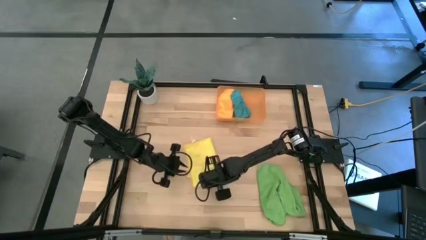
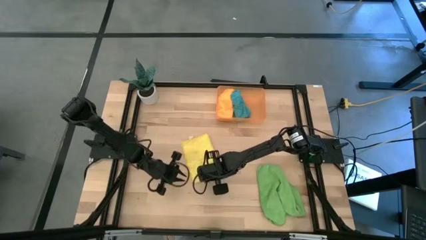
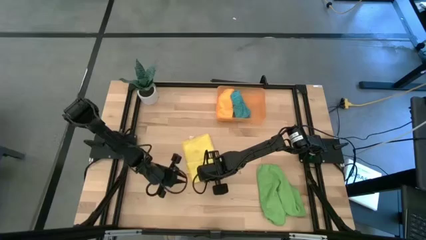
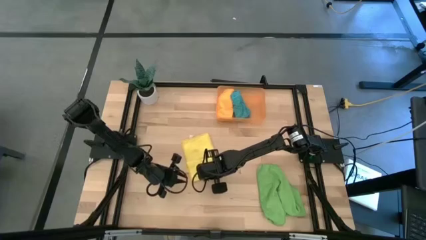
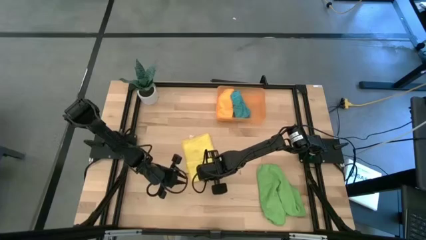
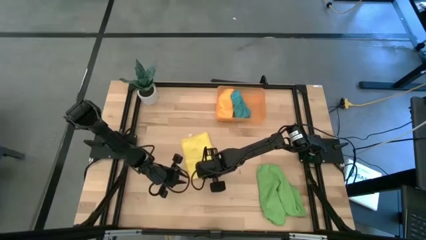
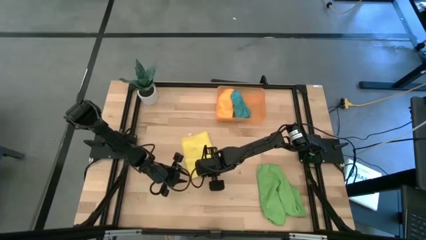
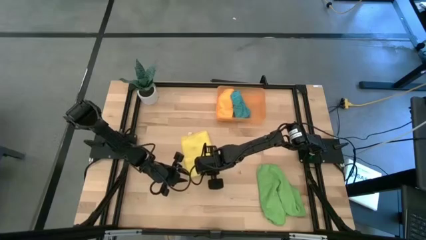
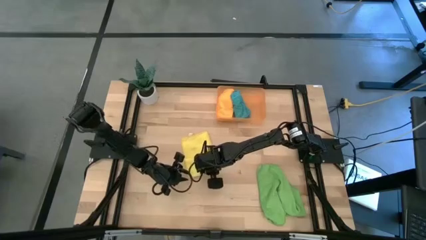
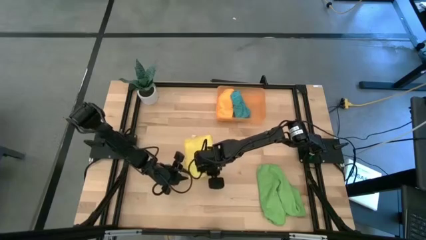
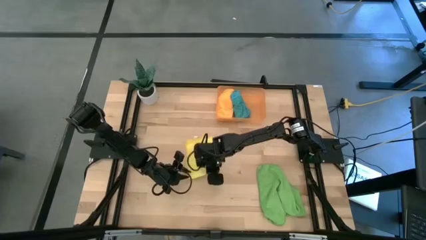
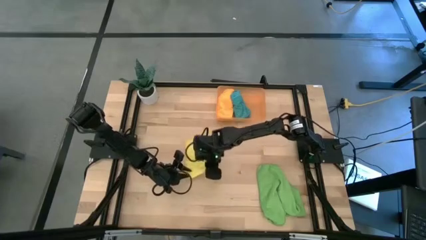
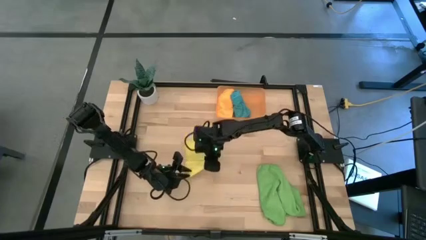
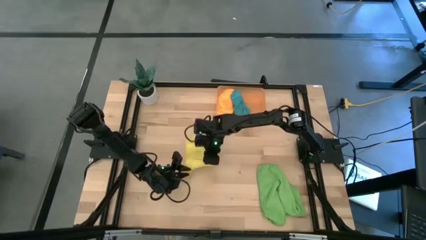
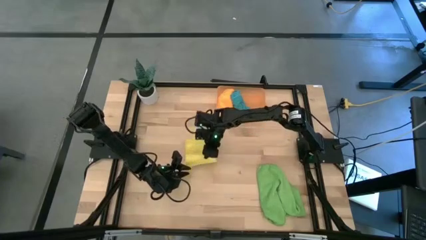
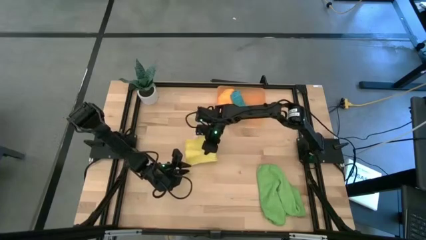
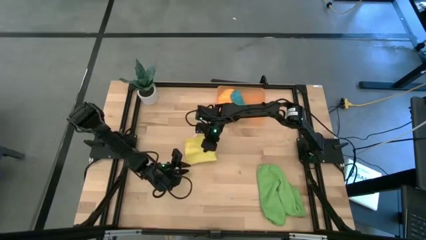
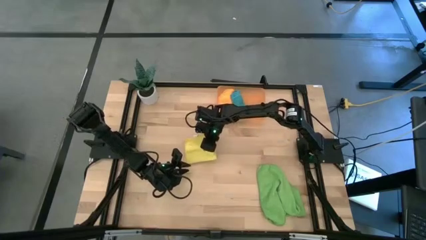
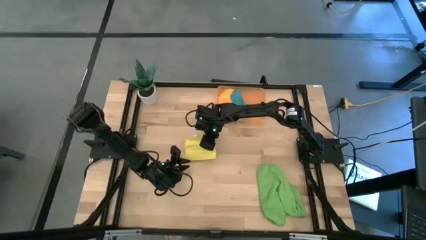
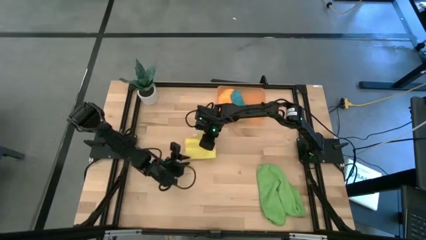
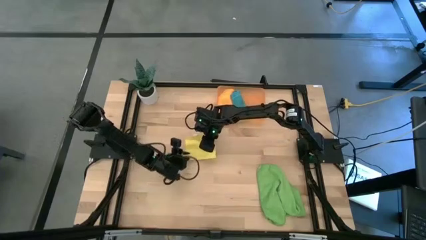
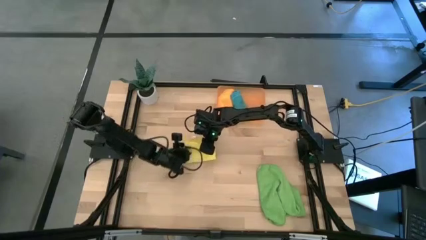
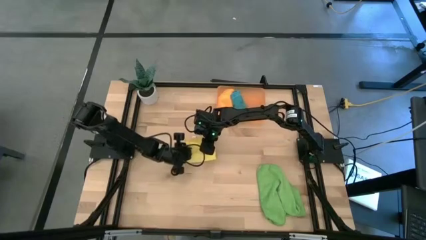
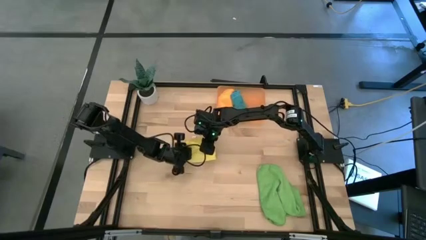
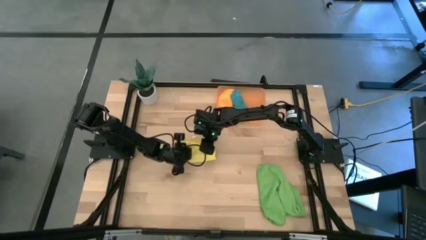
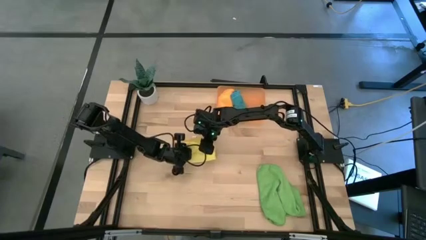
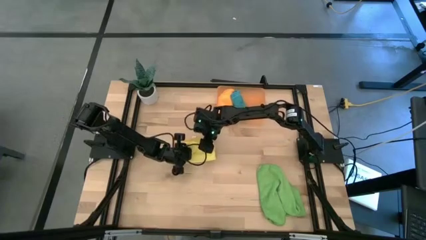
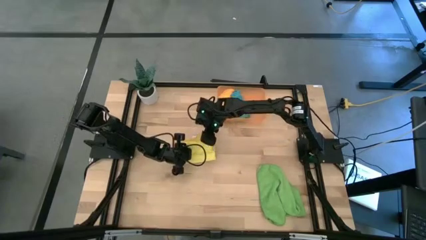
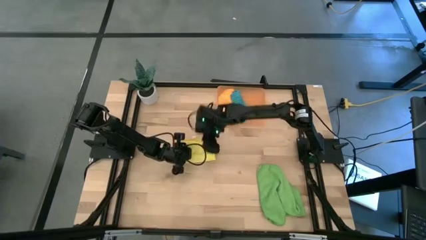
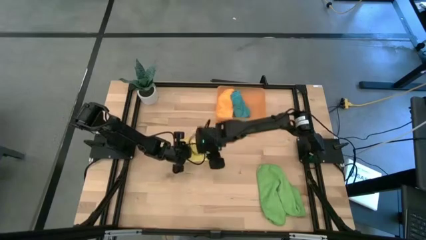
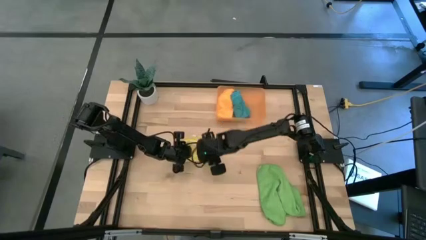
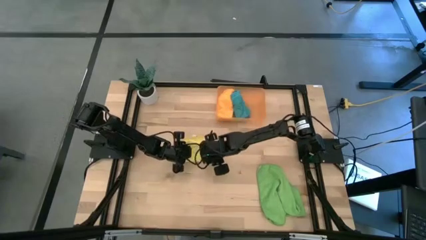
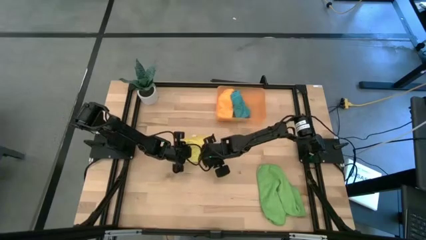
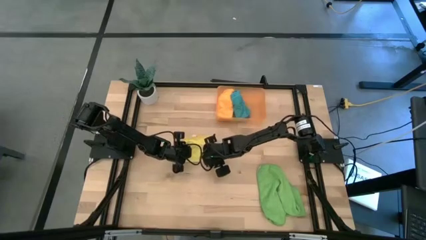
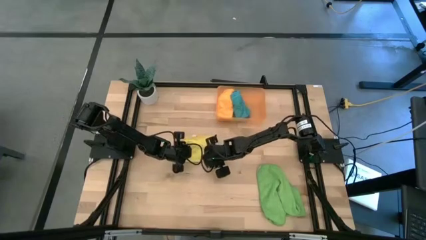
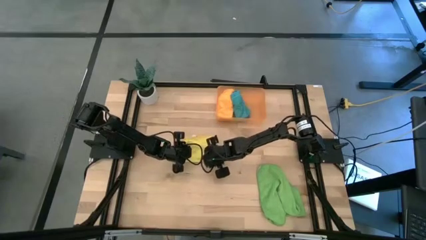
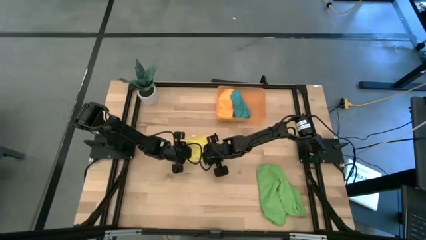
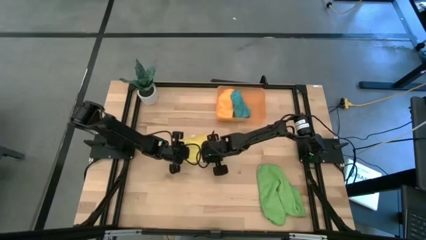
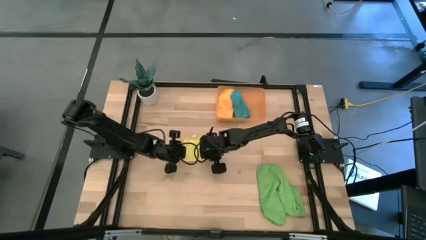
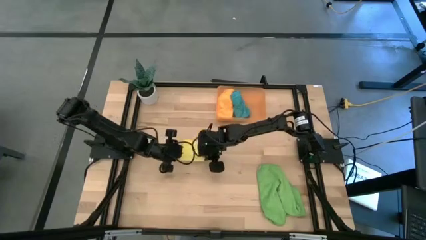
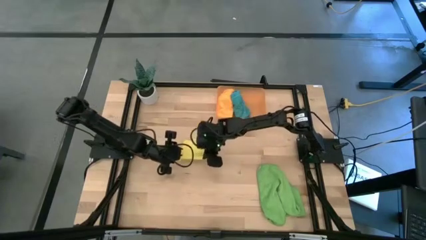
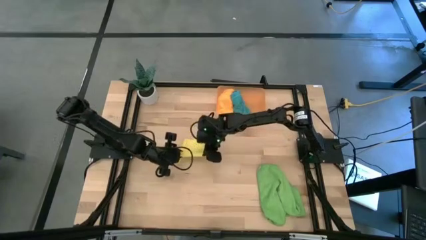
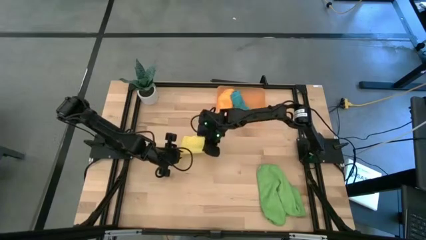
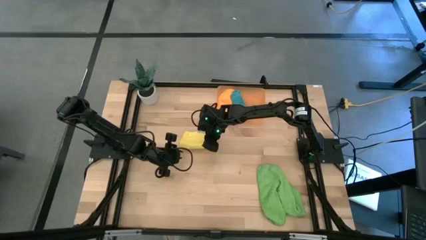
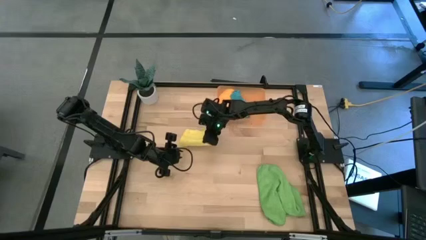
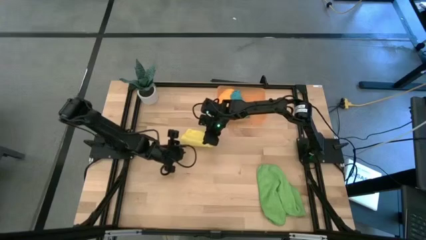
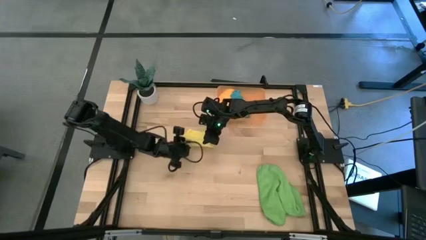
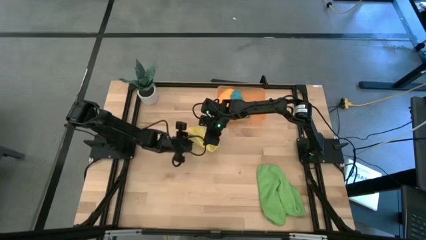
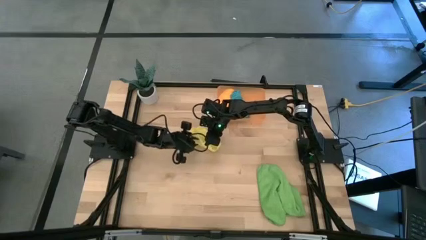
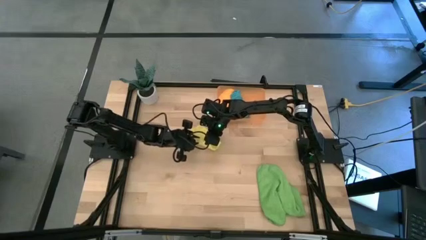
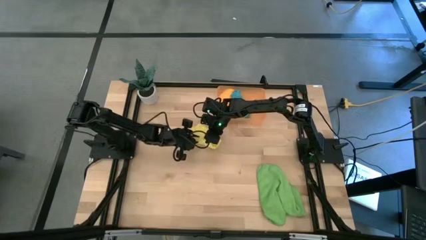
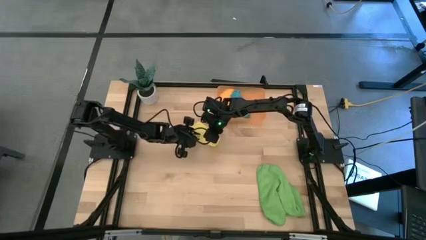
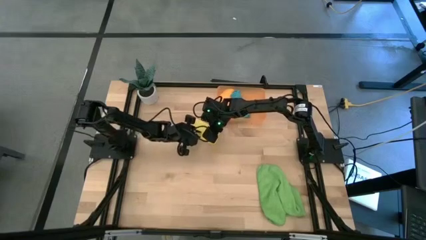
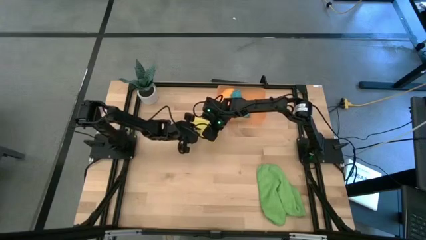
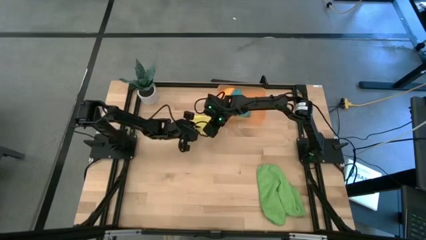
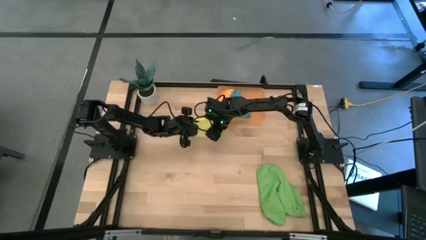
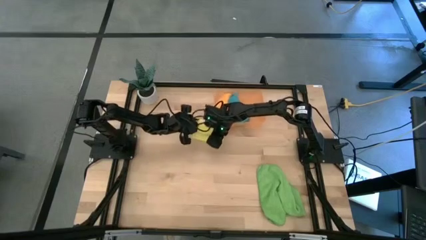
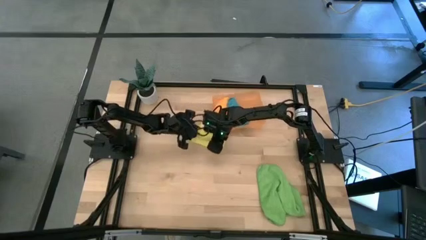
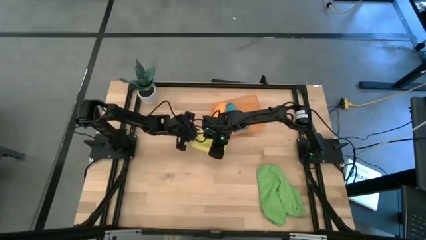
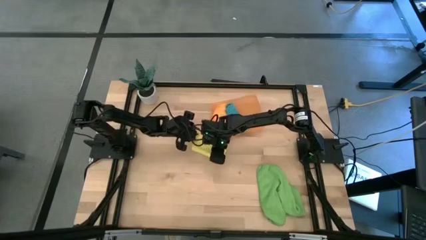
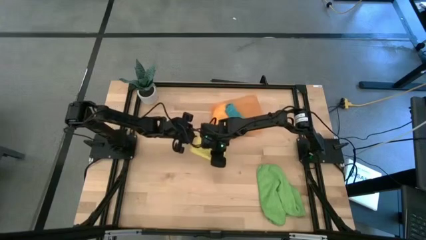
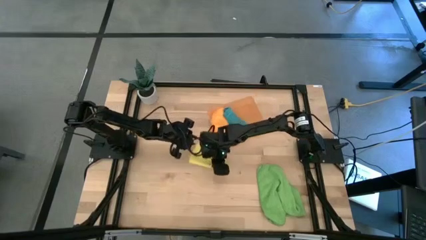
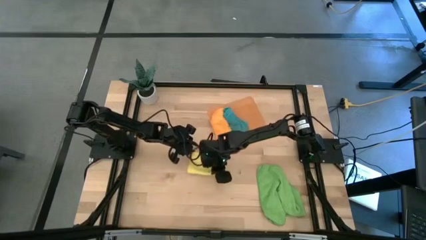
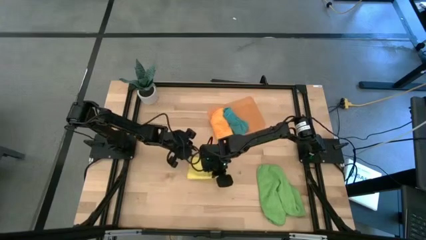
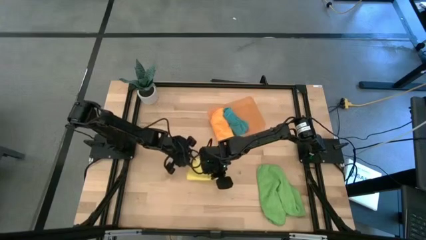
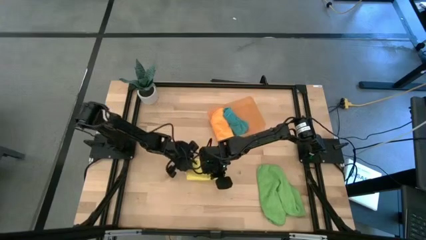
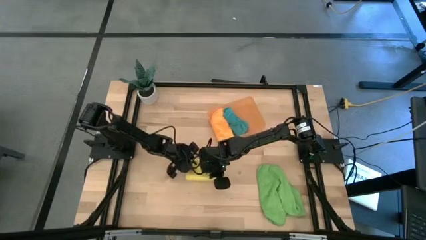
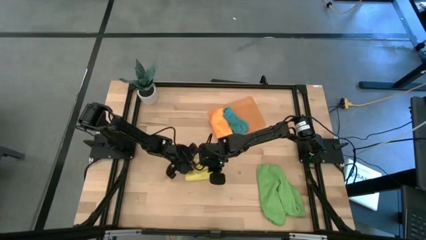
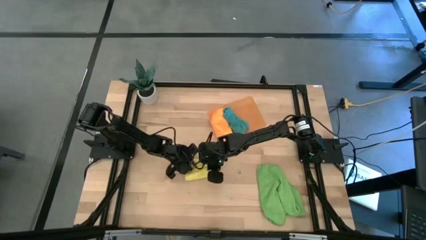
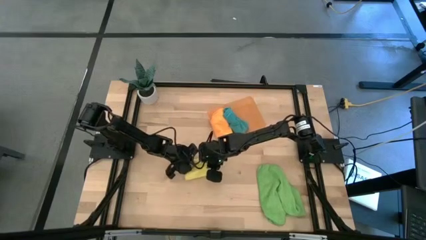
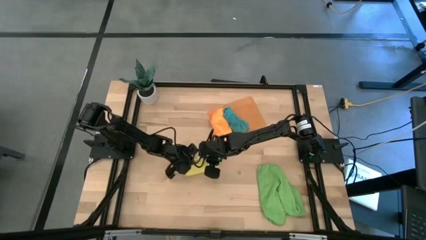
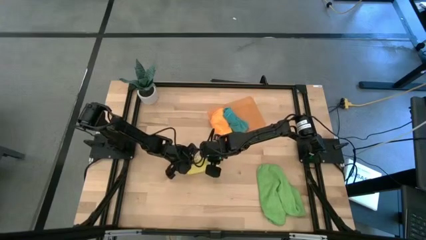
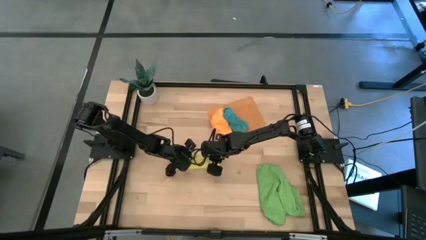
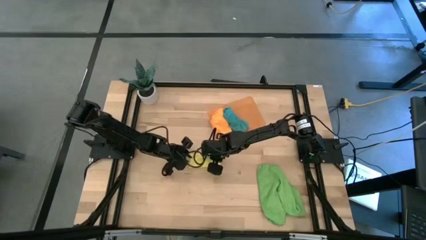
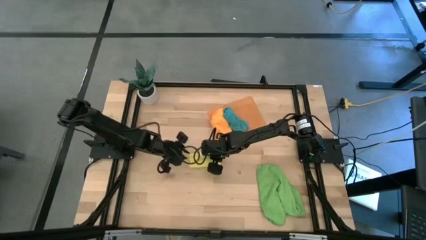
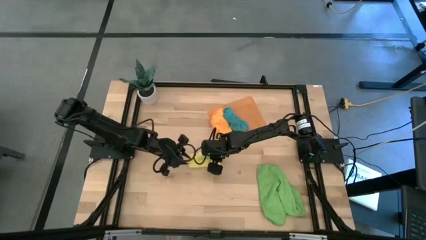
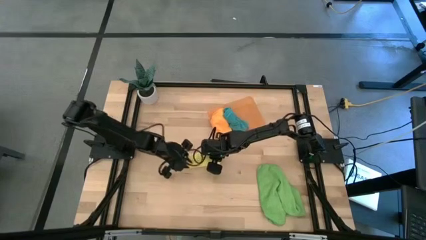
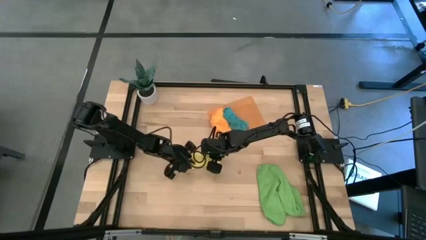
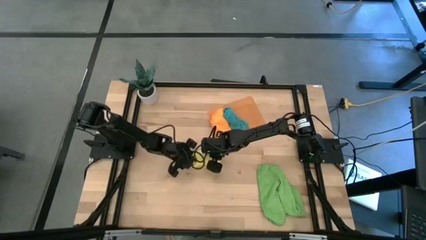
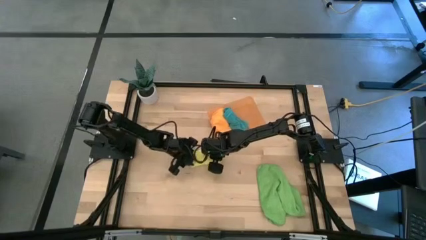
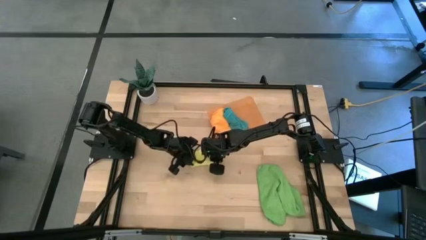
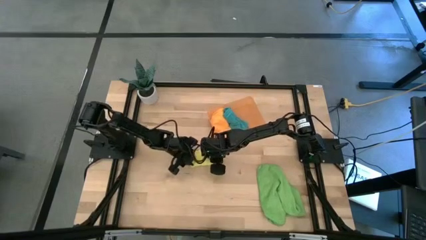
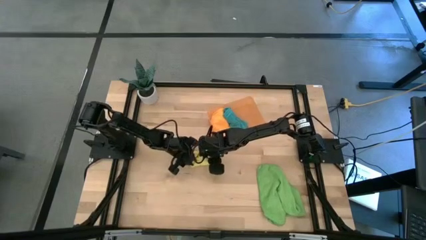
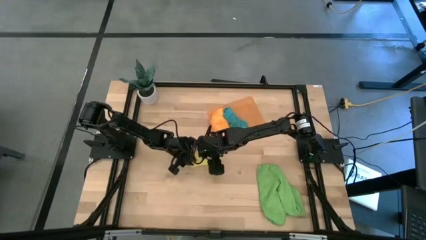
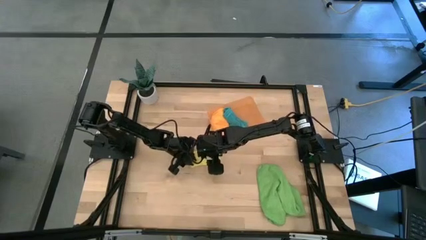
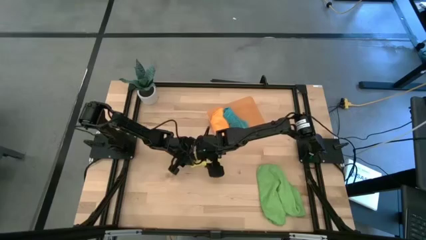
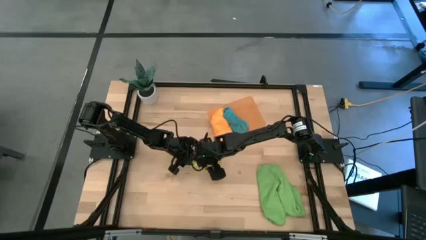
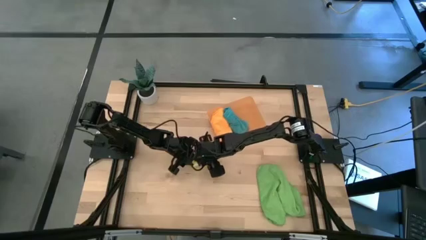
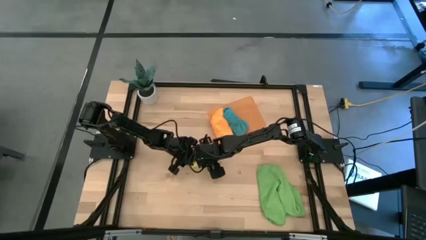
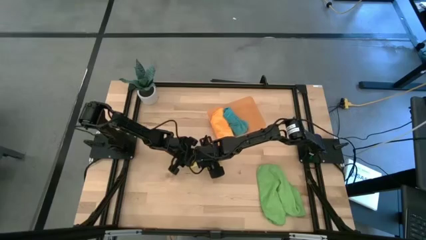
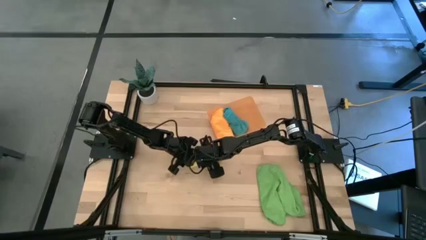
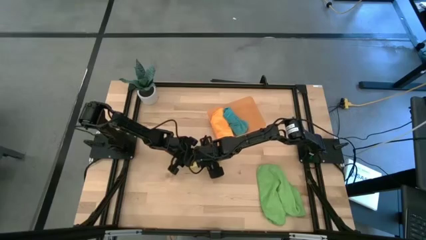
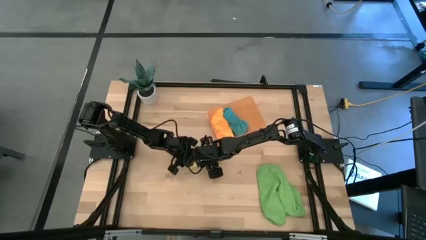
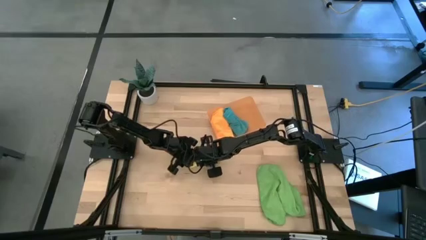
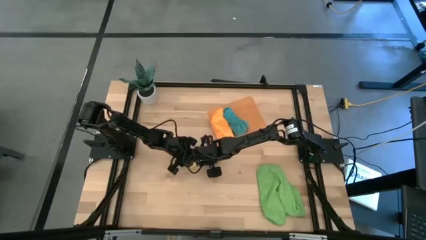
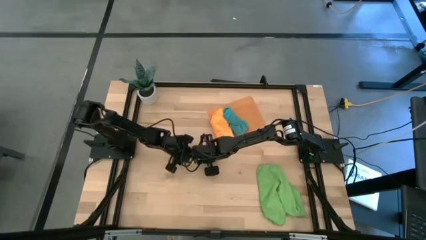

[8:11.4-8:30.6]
Task: Roll microfiber towels into tight, uniform cylinder then place into a basket
Roll the yellow microfiber towel
